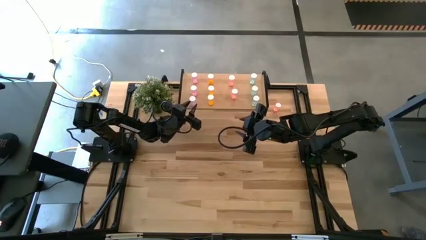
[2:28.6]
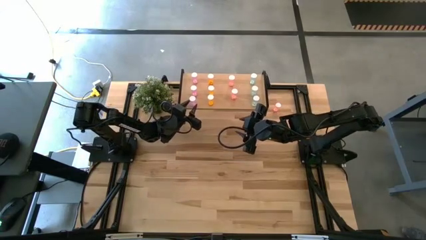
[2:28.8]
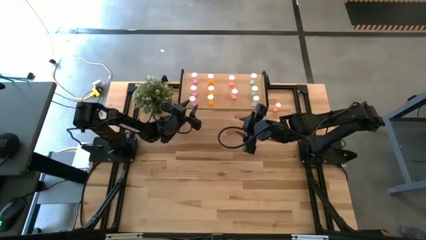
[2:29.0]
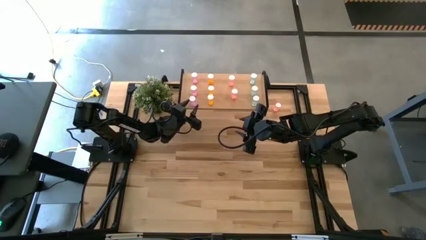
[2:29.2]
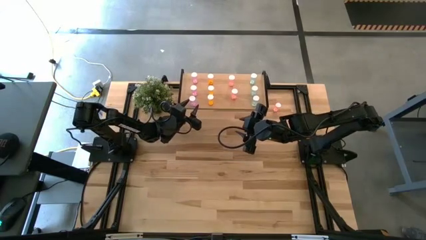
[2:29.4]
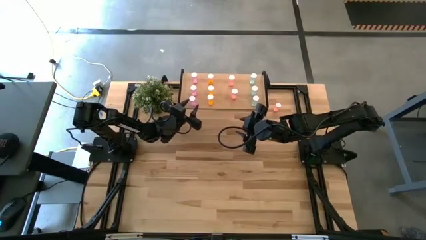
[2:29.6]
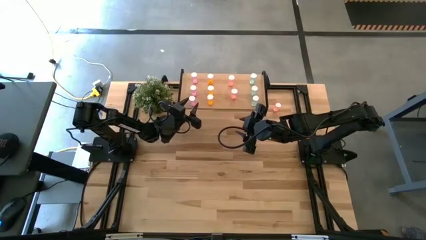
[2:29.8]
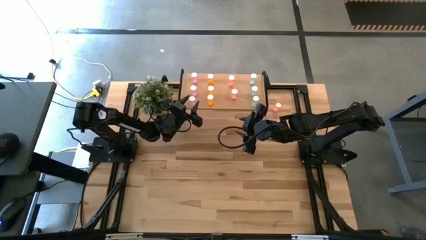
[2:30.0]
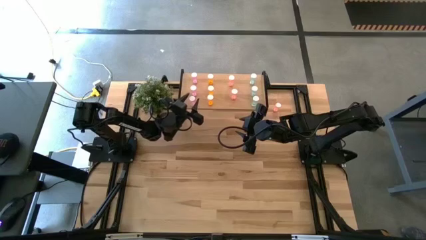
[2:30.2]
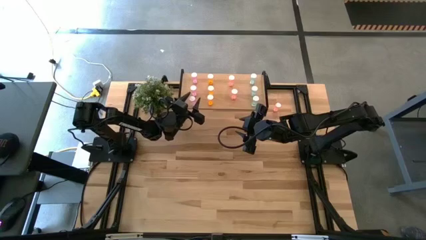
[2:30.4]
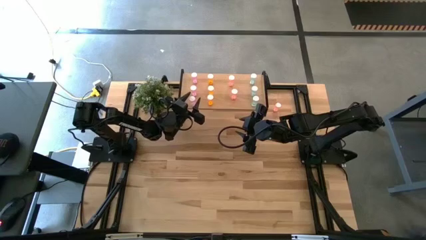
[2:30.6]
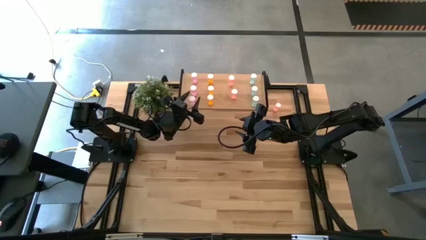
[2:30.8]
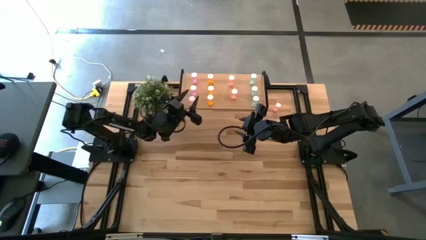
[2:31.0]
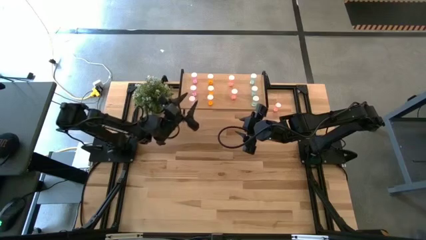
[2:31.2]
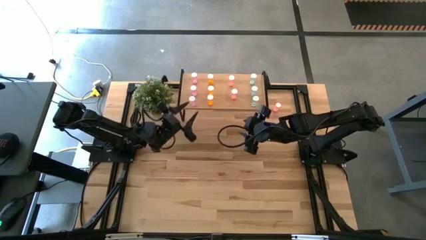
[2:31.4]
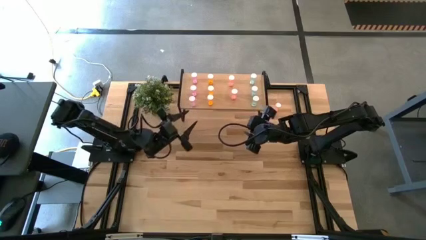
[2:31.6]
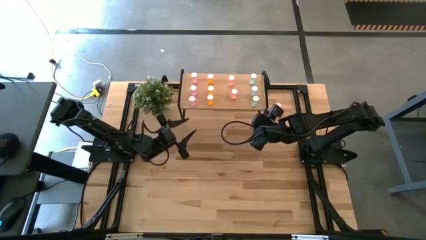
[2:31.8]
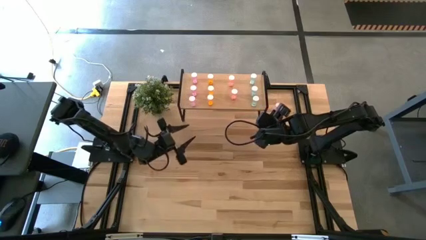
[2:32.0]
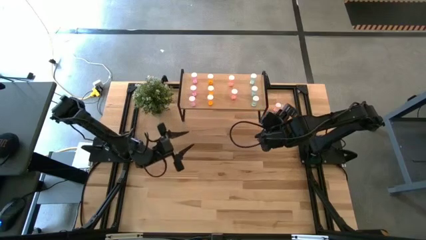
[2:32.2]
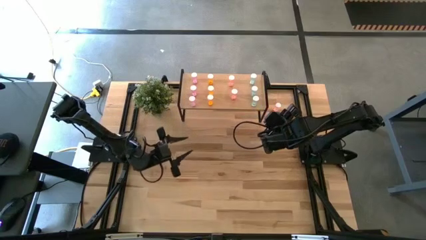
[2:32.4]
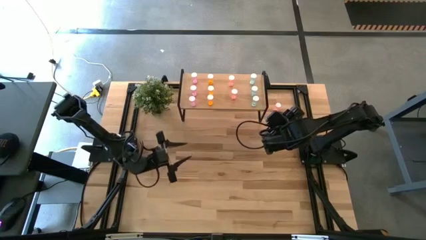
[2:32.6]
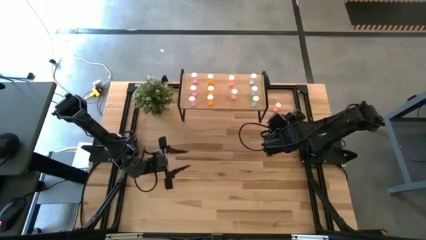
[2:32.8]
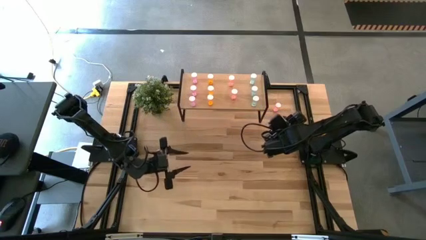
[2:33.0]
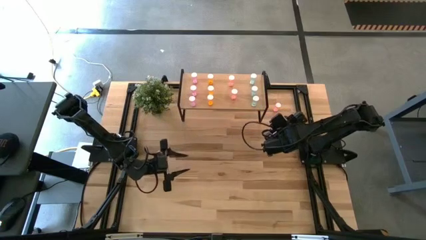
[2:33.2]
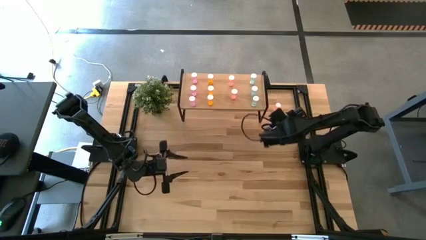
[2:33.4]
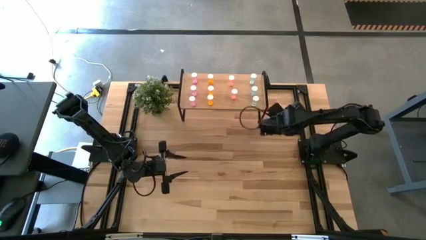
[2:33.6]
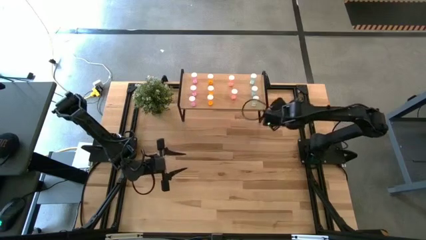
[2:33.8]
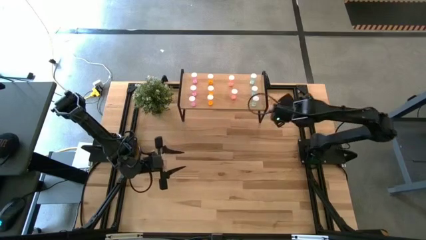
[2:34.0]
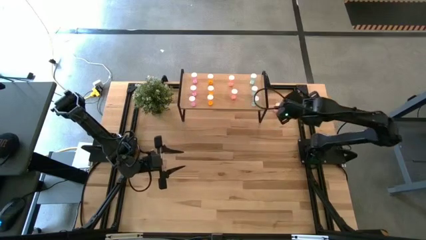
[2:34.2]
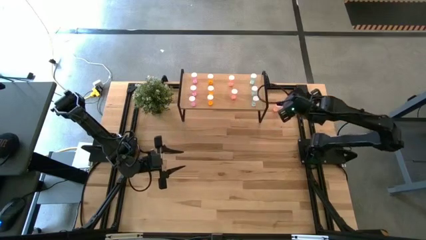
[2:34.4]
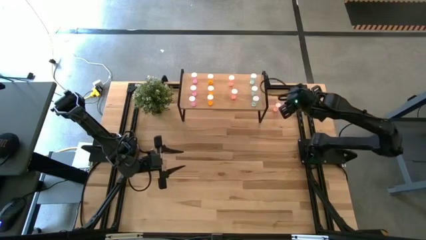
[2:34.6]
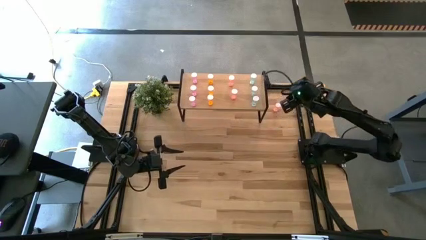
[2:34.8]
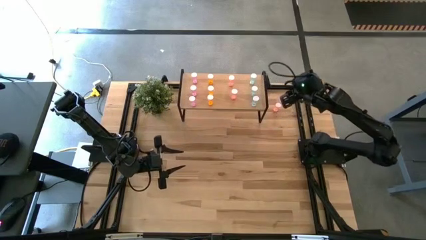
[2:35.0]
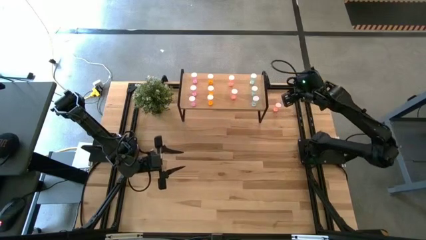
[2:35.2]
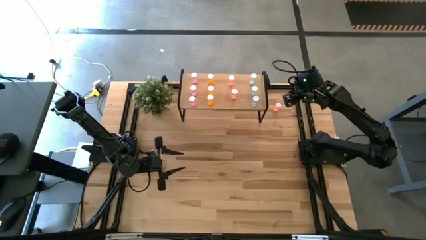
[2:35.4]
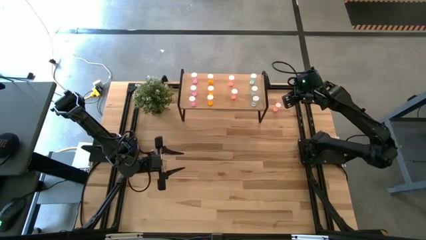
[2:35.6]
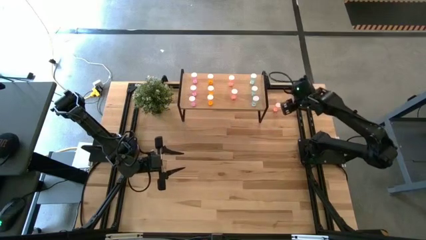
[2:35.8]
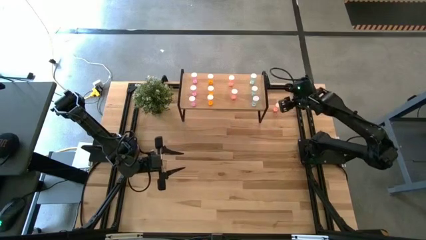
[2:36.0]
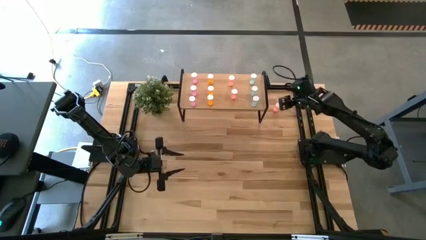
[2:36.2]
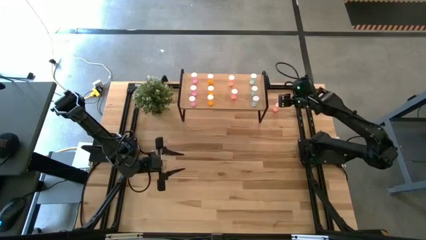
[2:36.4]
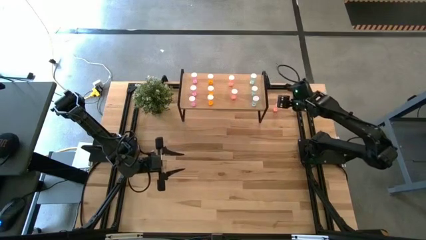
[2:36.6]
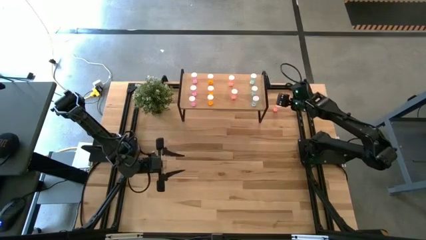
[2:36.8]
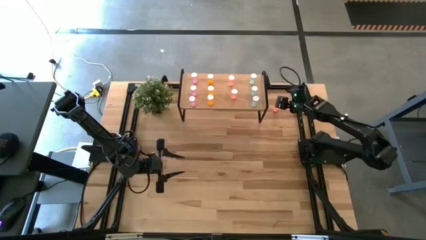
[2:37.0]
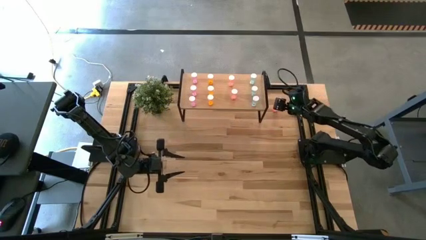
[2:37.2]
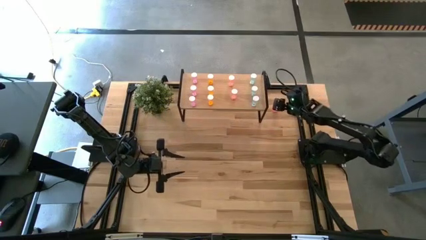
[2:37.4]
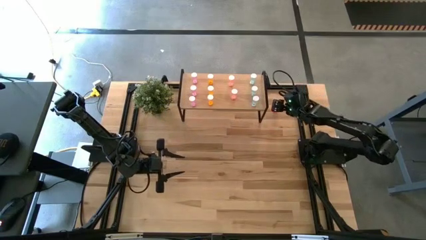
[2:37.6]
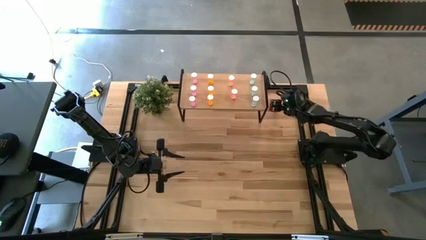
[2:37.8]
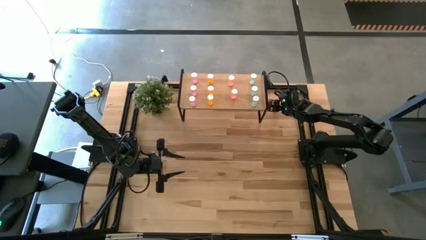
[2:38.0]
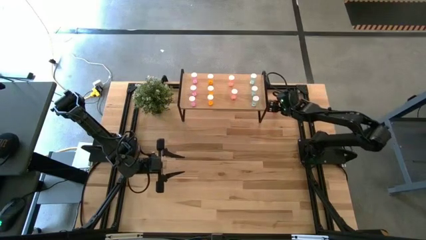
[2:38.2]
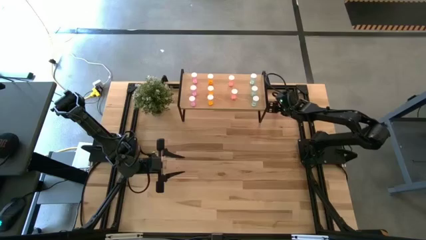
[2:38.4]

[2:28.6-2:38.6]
Task: Pick and place medicine bottles onto shelf by color
Put the red pill bottle aligned with the other red pill bottles on the shelf
